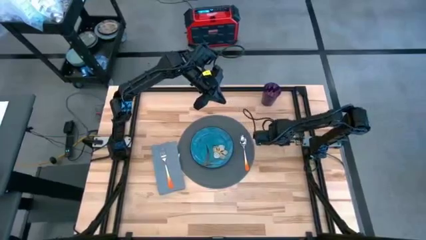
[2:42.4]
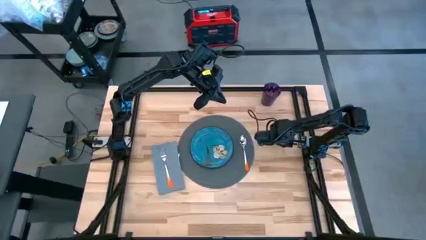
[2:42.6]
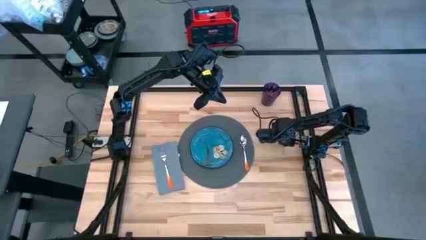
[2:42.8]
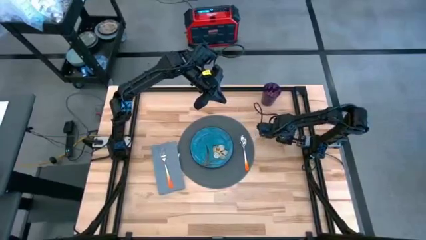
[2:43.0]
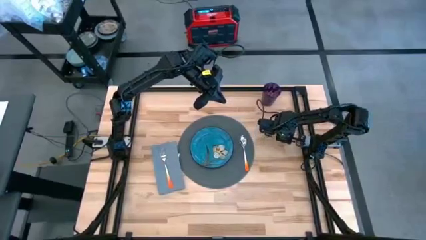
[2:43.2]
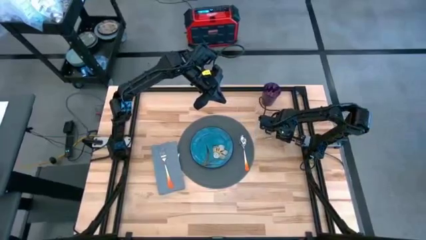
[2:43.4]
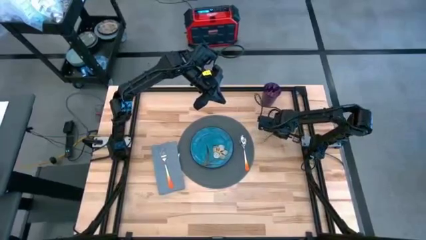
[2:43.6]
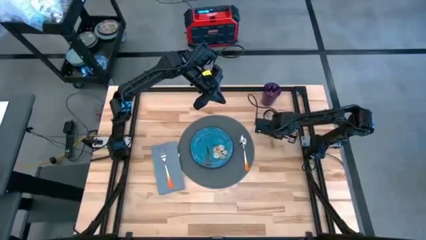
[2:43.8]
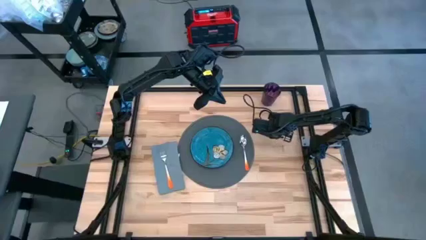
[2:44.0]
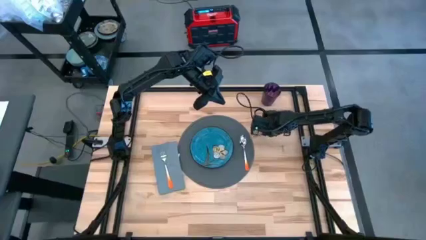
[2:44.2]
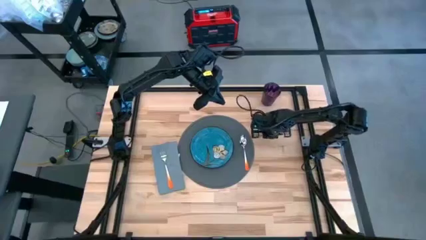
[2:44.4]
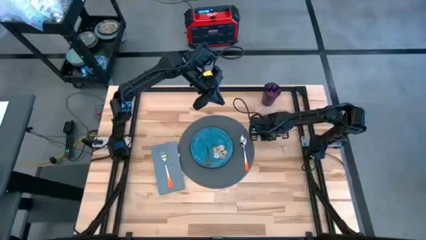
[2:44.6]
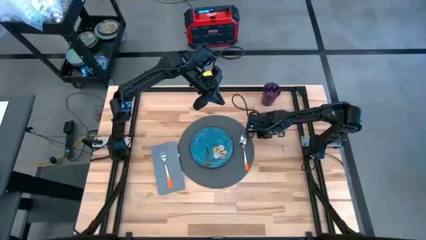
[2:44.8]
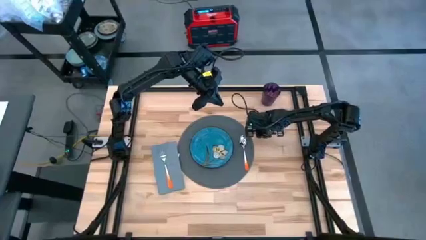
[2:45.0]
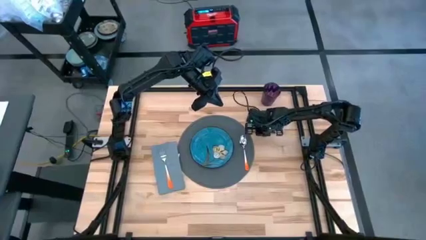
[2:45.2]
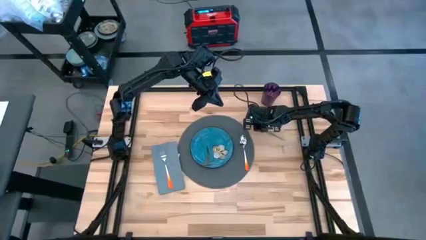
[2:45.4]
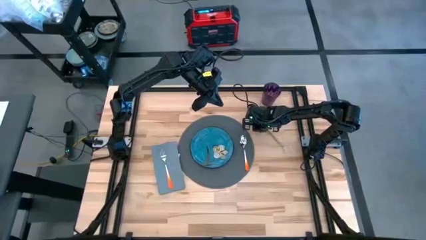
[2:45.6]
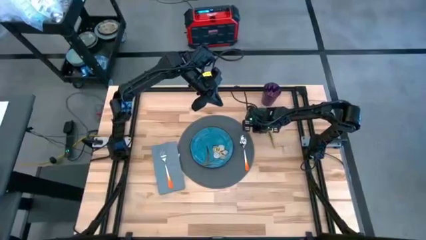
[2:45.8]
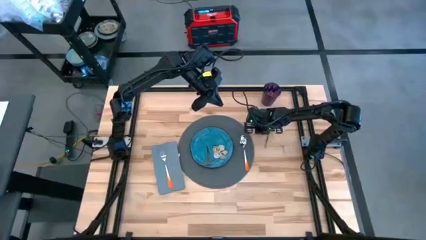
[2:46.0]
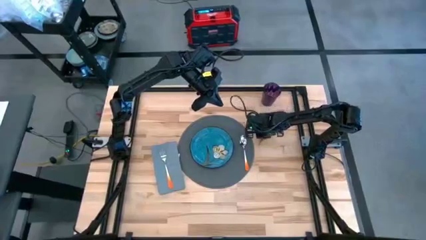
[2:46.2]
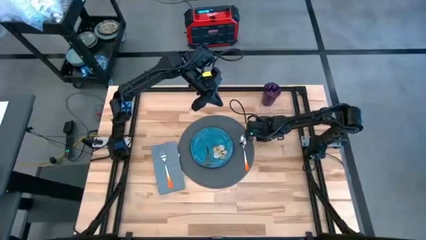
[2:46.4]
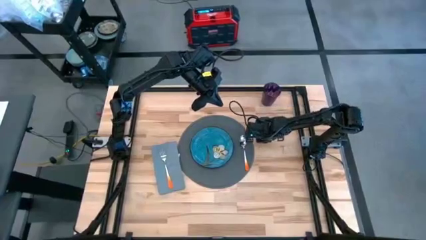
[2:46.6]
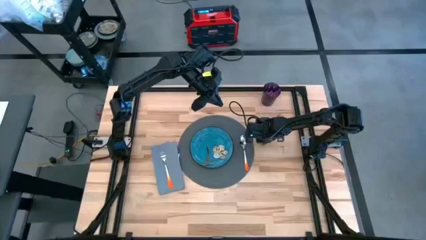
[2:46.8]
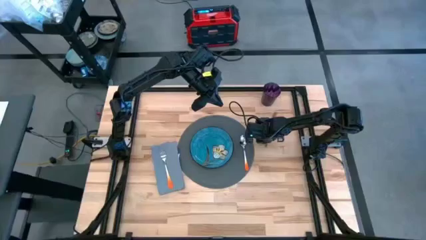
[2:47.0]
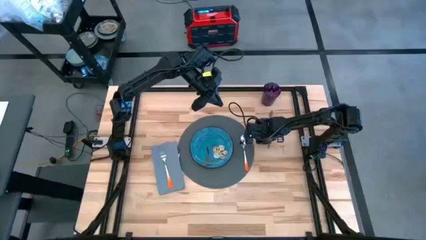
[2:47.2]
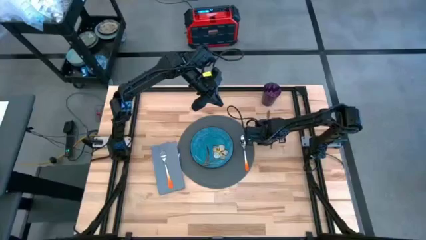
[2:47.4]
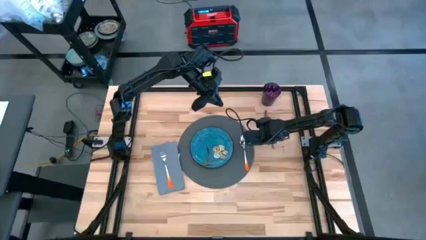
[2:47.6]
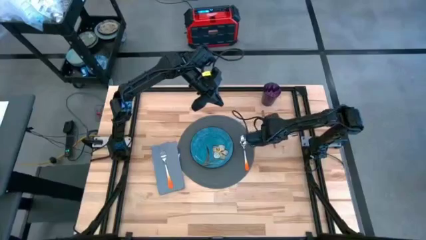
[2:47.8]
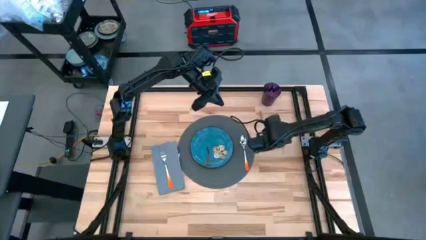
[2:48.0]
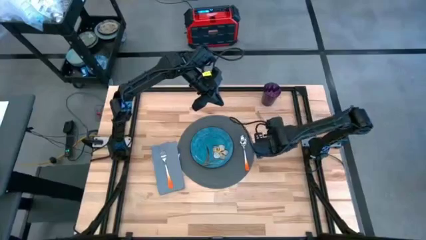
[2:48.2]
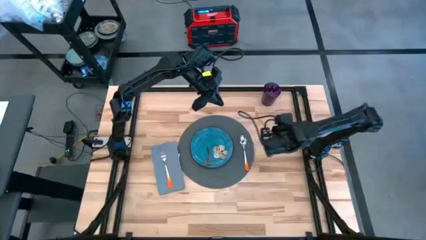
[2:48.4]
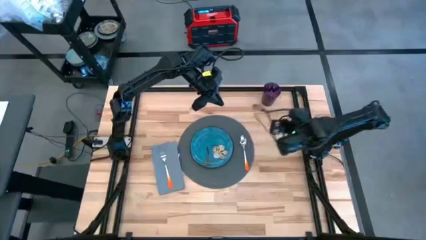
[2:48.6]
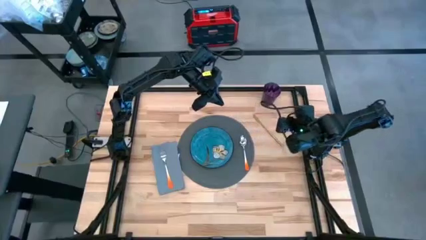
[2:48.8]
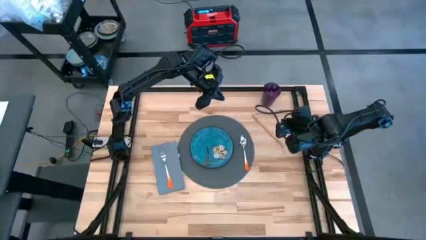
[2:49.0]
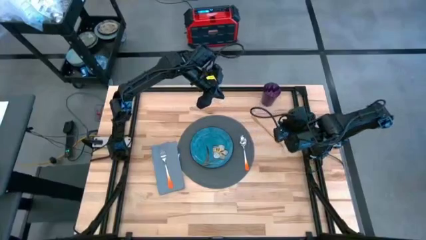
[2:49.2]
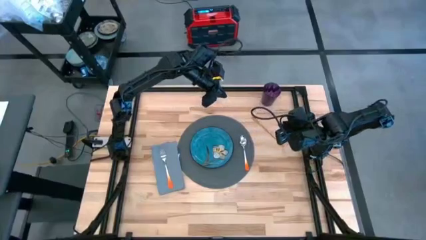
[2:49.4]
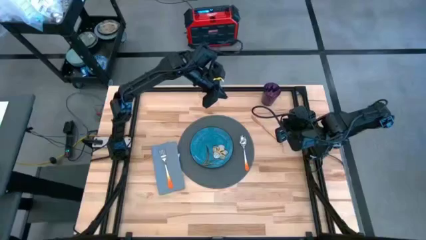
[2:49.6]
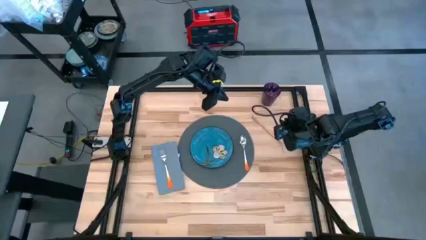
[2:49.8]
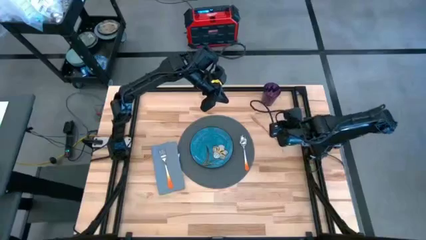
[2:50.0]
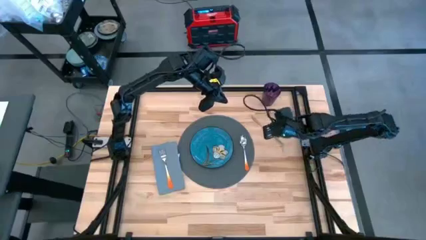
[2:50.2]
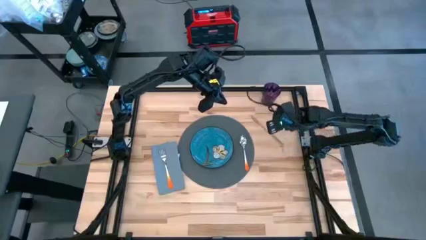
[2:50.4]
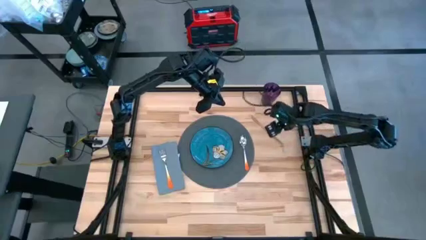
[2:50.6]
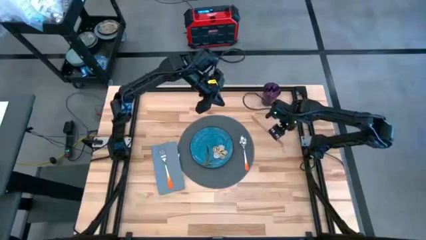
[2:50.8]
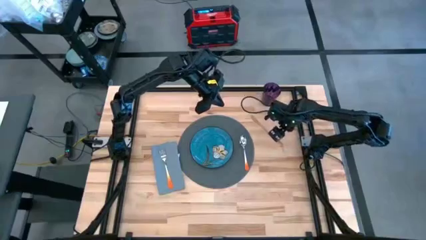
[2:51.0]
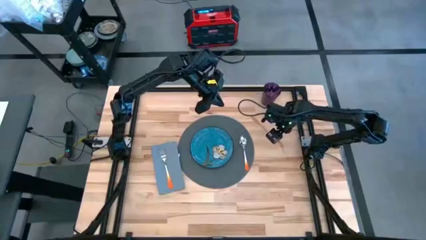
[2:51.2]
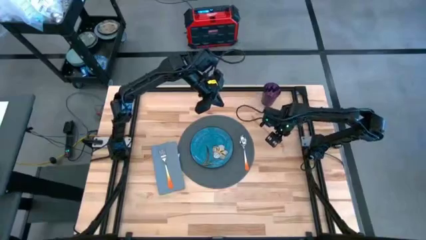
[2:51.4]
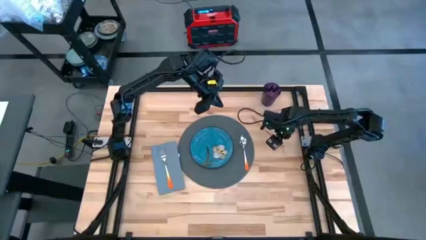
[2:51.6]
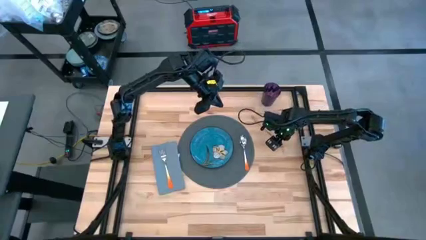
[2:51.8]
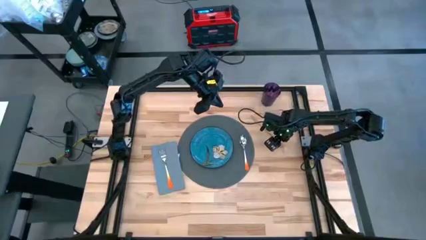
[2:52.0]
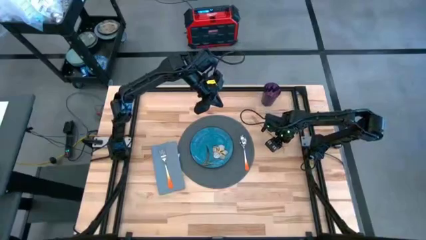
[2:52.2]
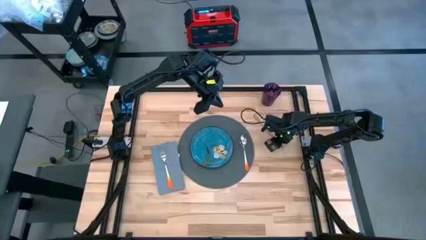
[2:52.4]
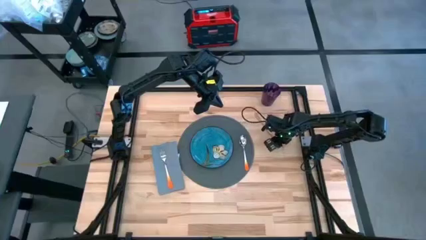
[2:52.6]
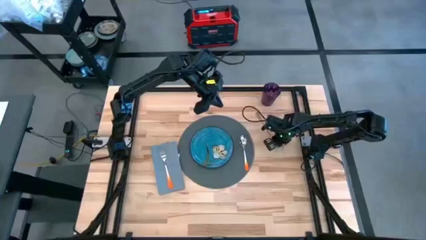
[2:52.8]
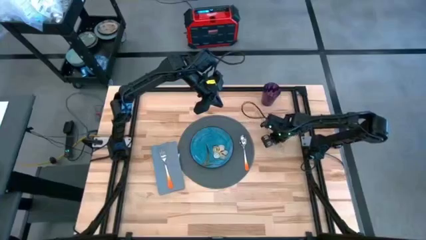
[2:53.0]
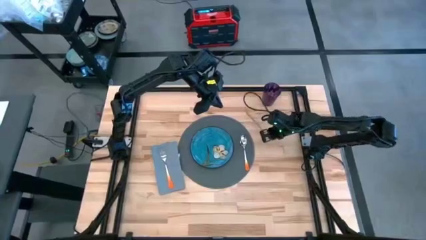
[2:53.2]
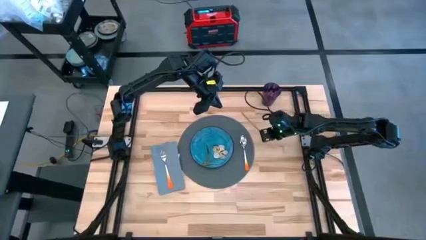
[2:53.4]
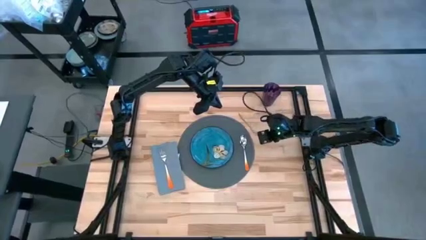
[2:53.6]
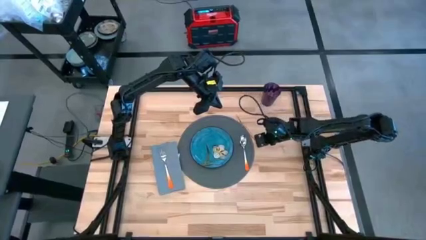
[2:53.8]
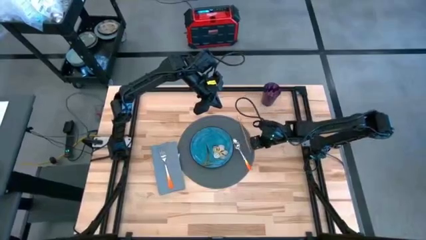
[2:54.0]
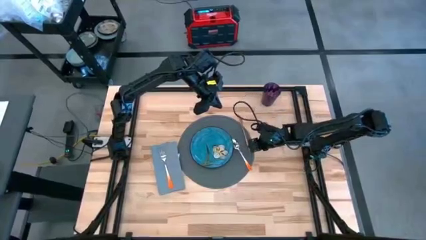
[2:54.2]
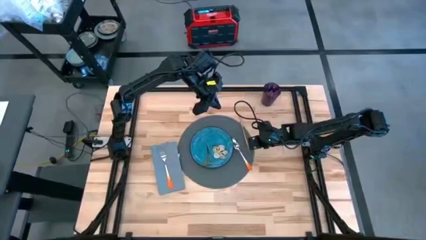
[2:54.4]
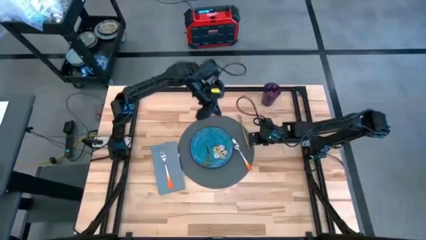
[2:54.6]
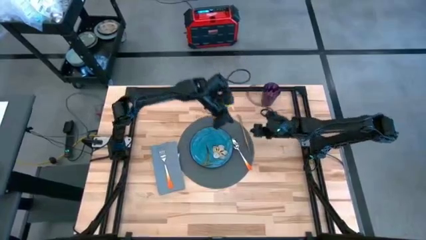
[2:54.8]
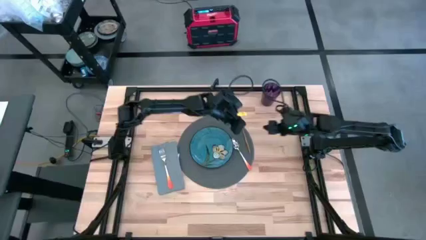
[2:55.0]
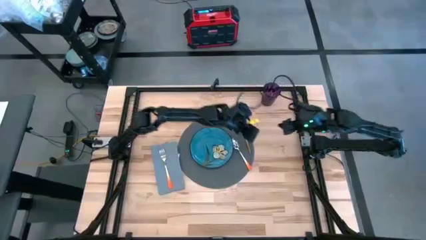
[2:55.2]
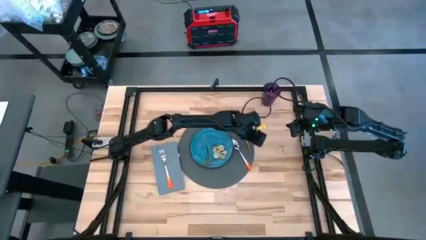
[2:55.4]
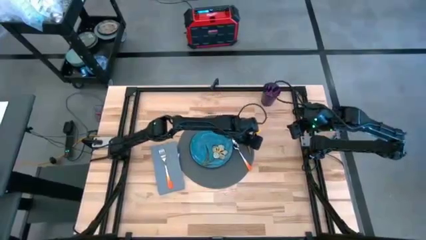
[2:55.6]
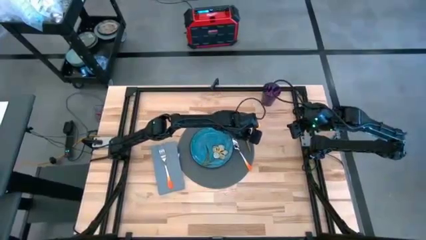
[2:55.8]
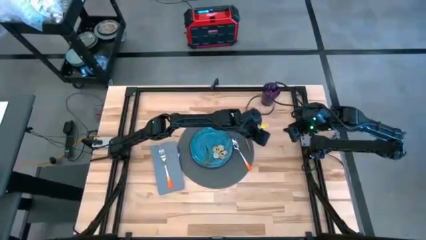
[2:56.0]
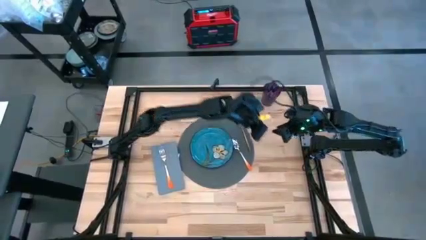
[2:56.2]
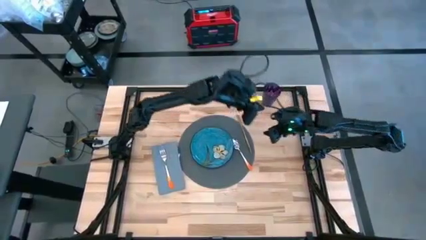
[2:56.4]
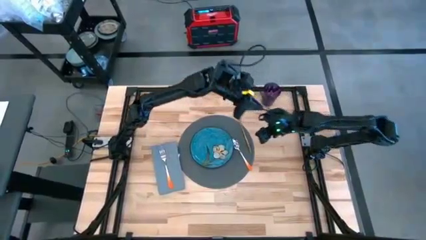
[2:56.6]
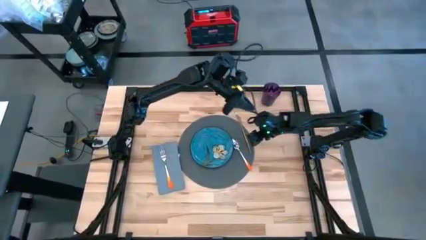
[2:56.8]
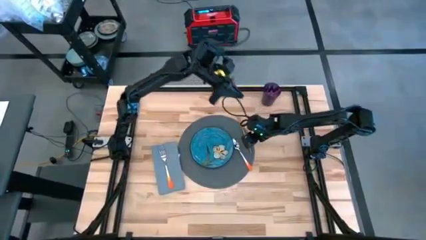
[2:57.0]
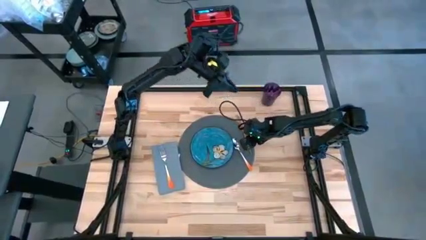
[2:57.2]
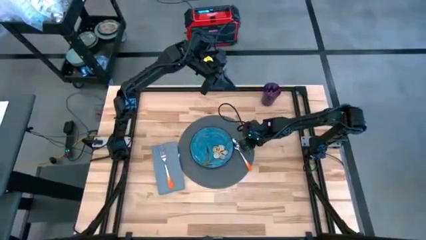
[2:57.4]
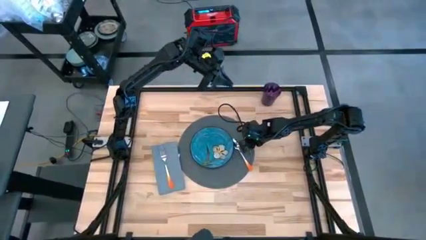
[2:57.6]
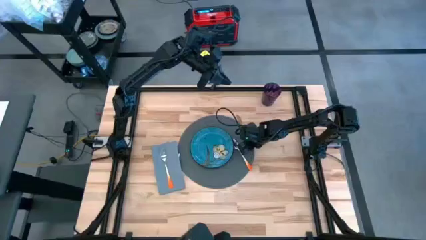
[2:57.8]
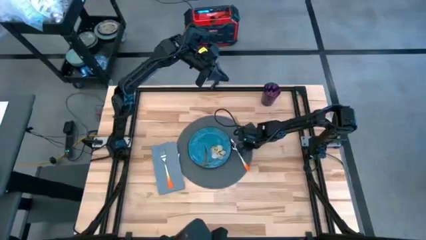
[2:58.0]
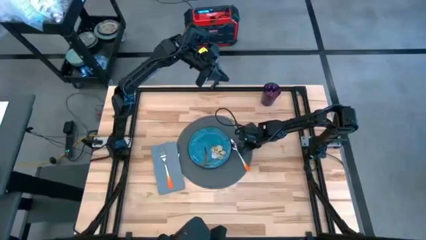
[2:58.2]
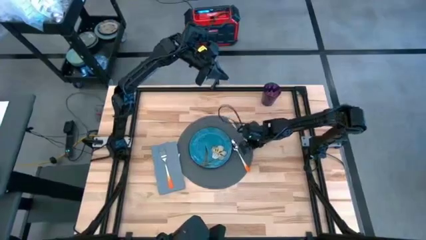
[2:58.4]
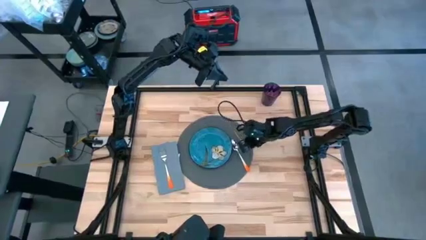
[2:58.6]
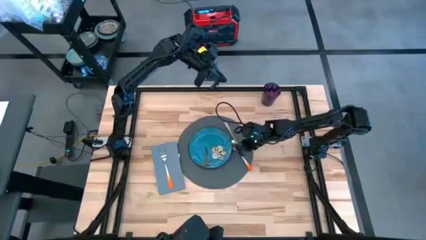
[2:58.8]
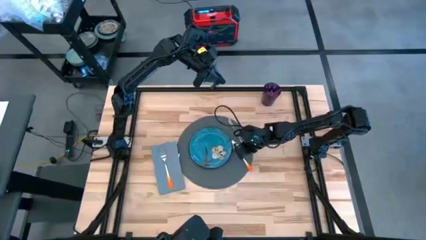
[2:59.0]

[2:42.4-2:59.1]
Task: Set table place
Put the gold knife on the gray placemat

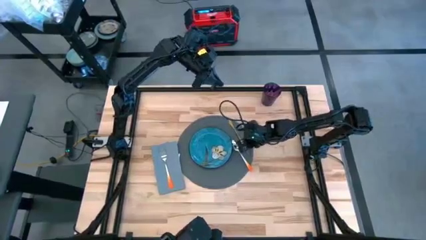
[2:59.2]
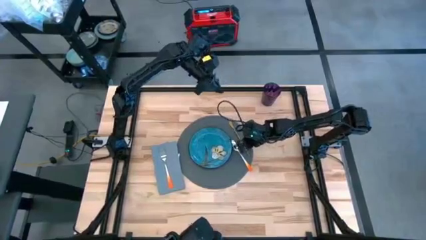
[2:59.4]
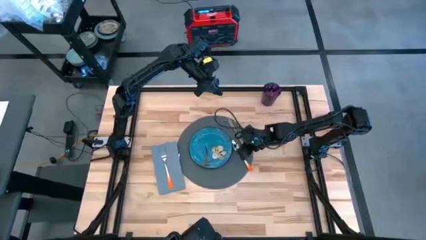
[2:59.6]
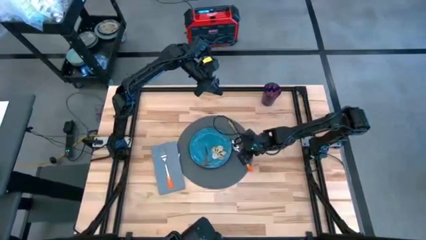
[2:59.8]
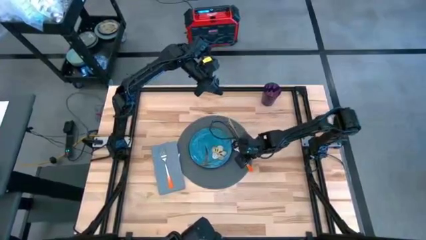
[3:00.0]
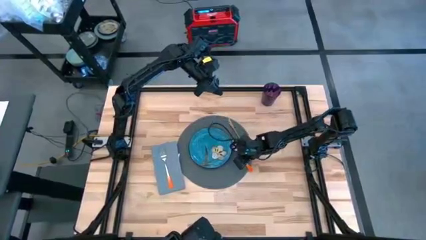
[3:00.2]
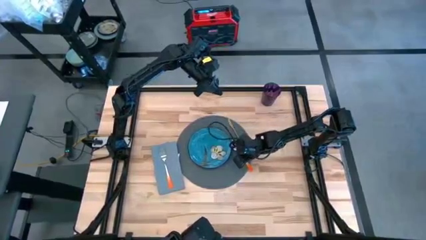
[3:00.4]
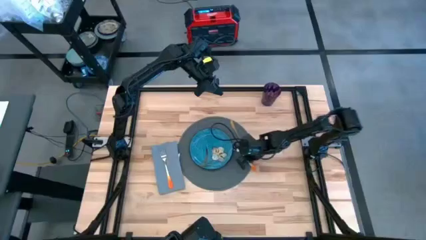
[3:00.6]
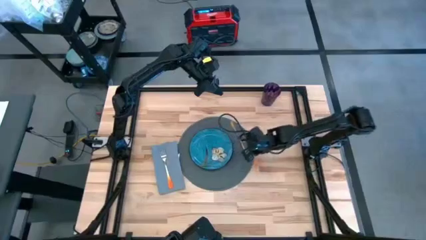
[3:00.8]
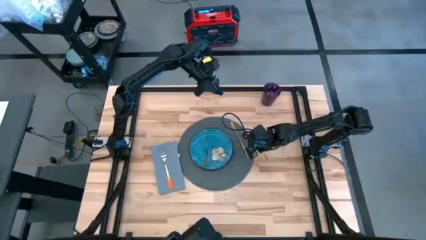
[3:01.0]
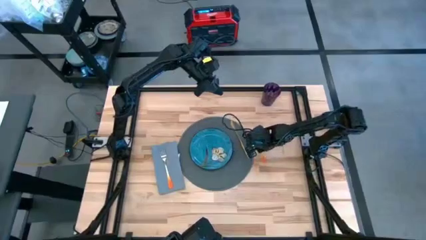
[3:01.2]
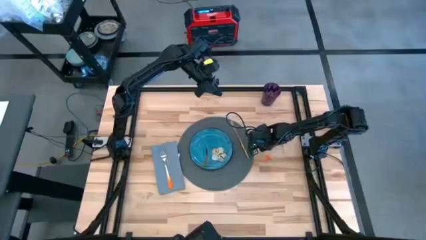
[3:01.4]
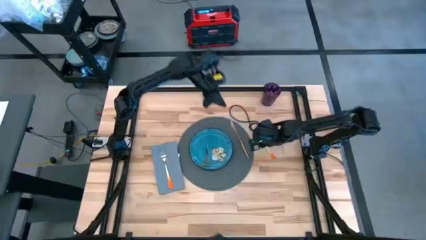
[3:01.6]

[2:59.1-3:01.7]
Remove the orange spoon from the gray placemat
